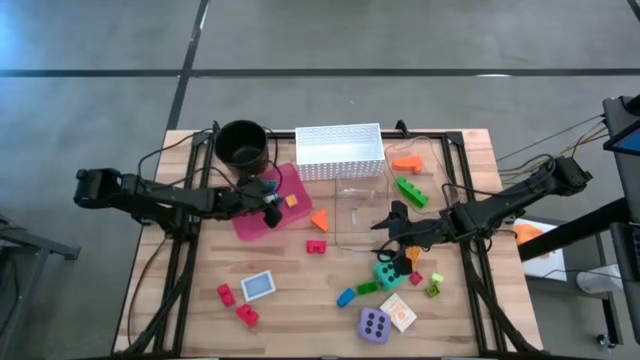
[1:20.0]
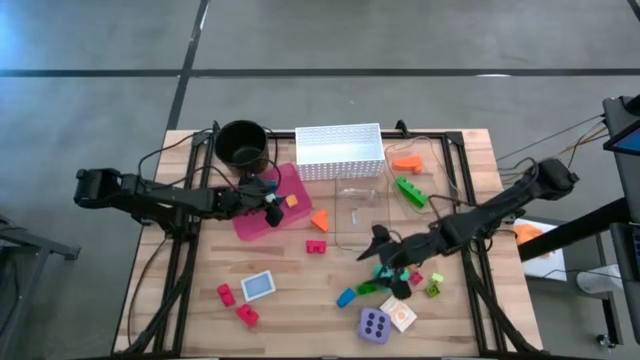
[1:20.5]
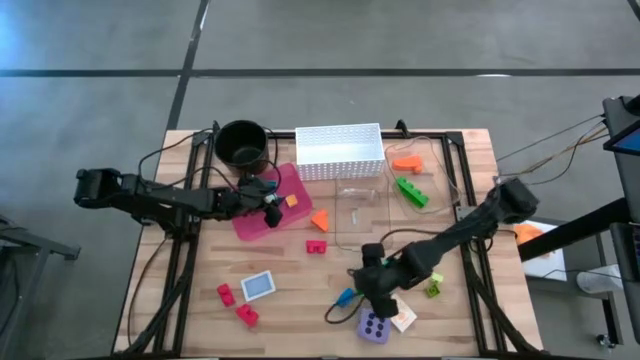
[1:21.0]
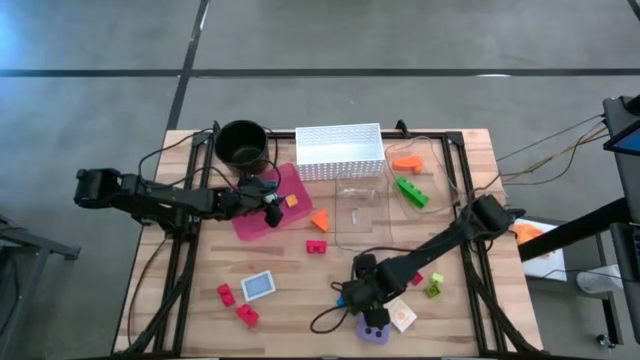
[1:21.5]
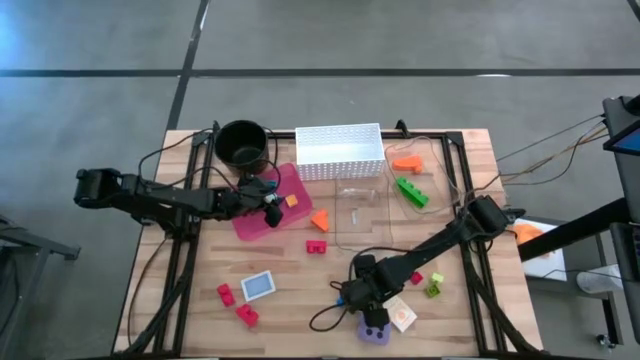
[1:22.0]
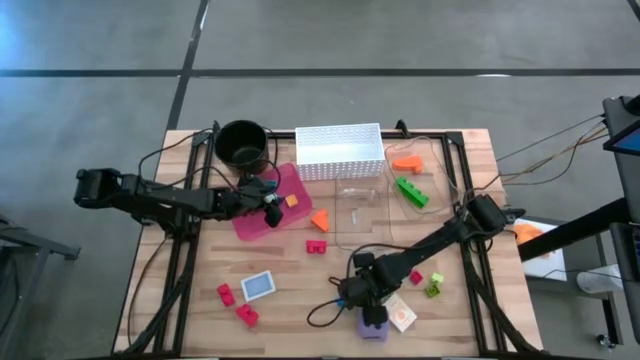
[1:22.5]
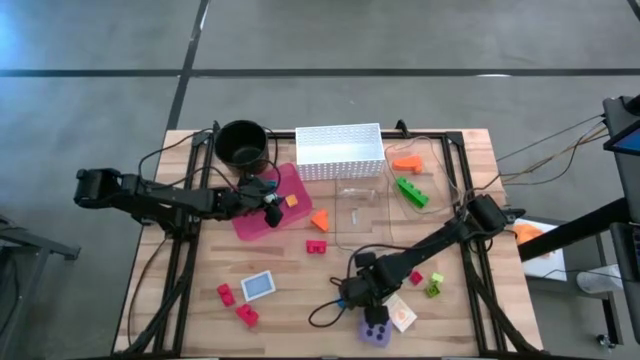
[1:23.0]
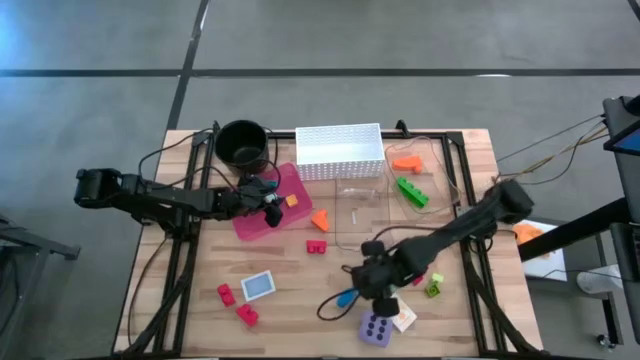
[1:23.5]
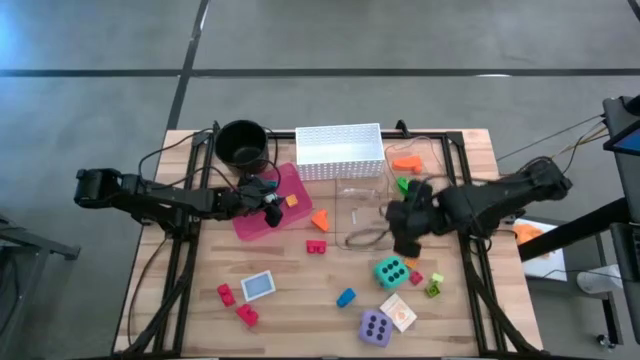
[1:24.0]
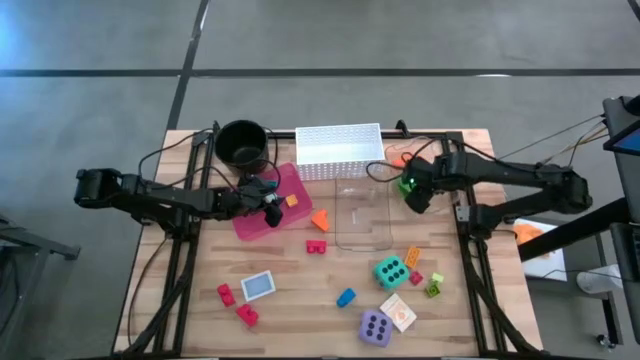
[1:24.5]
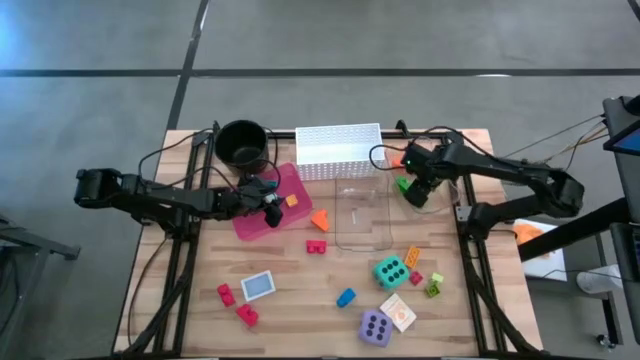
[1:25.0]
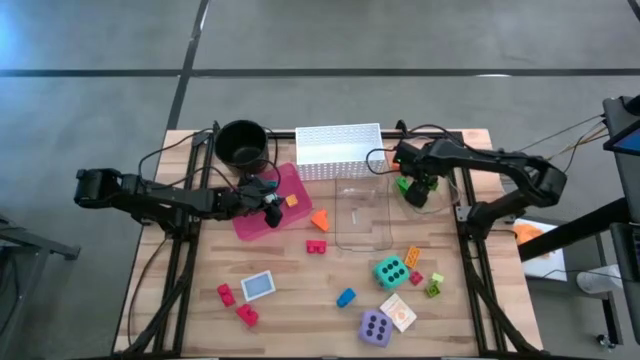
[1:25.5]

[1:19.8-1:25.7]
Task: Pick & Place Toys
Put the large green game piece into the top transparent bin

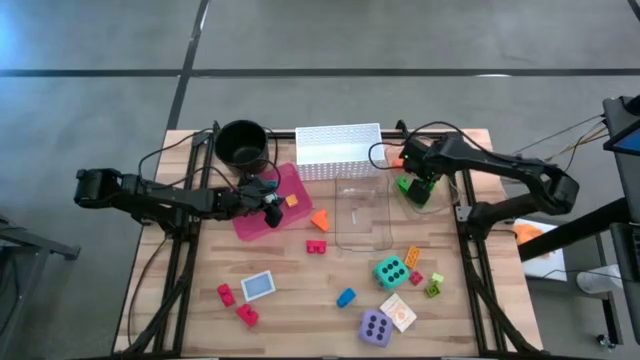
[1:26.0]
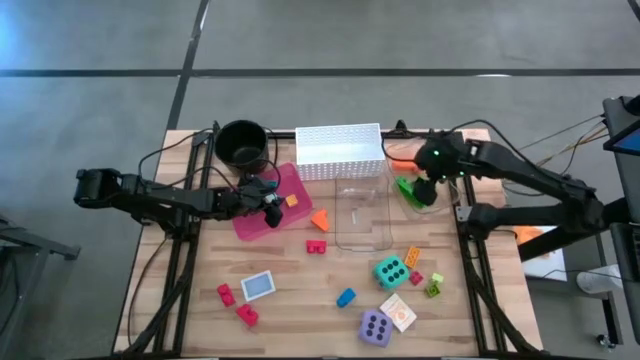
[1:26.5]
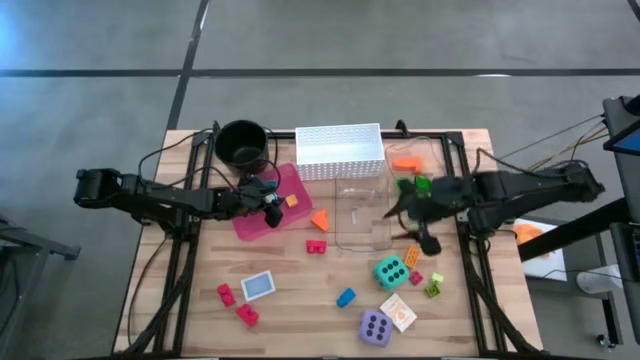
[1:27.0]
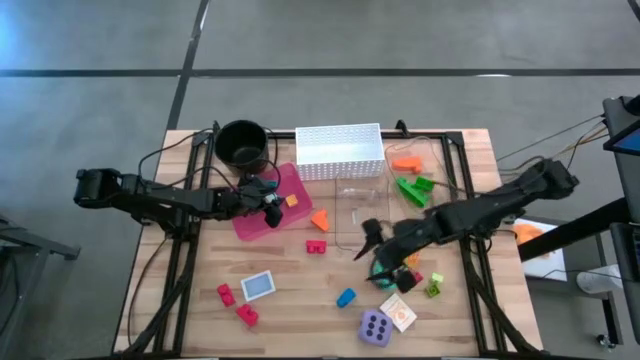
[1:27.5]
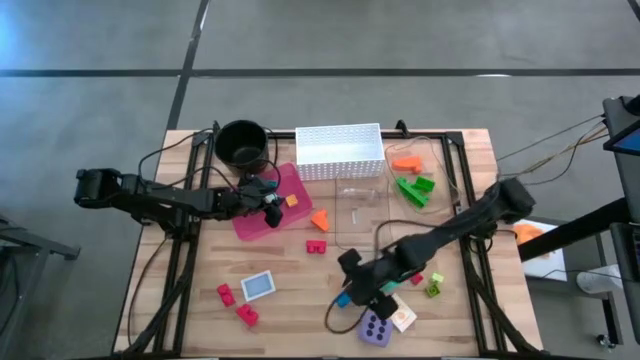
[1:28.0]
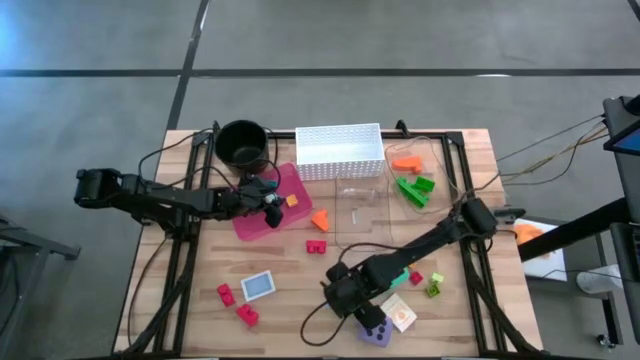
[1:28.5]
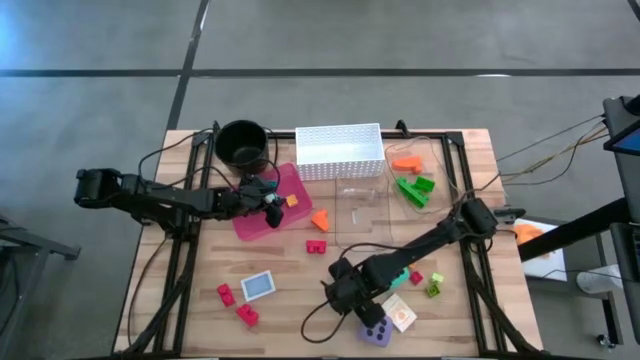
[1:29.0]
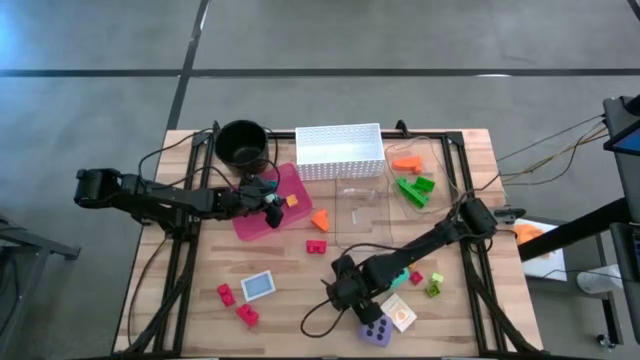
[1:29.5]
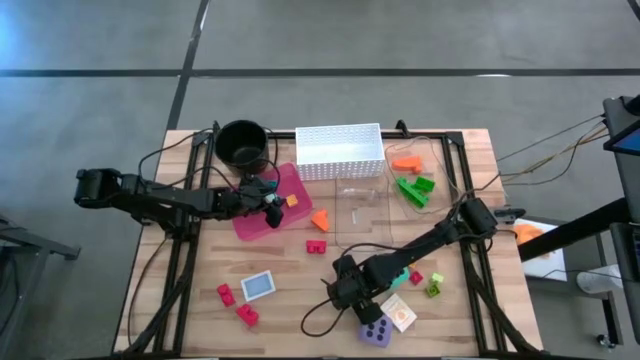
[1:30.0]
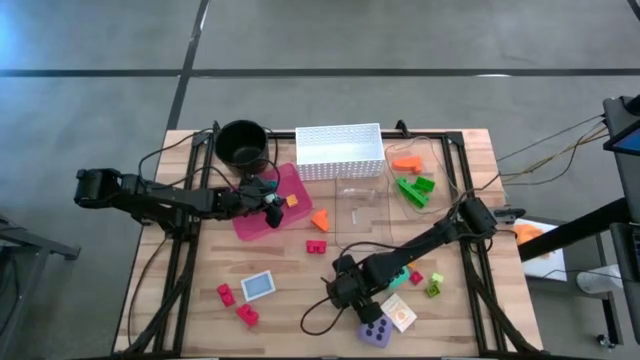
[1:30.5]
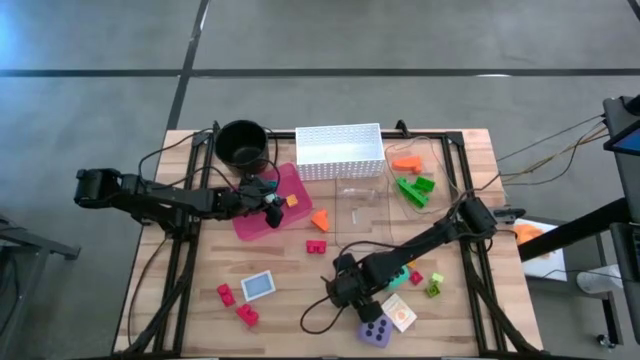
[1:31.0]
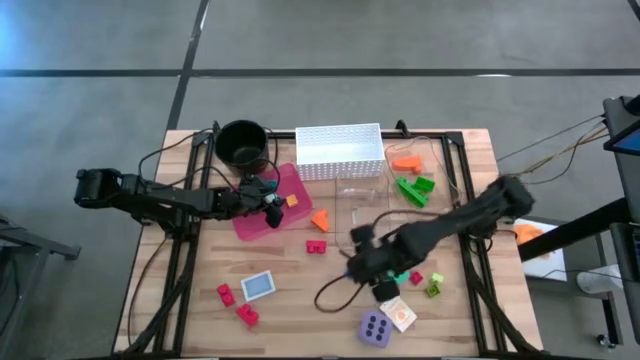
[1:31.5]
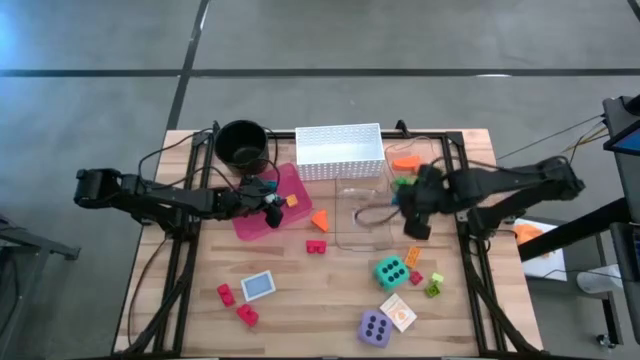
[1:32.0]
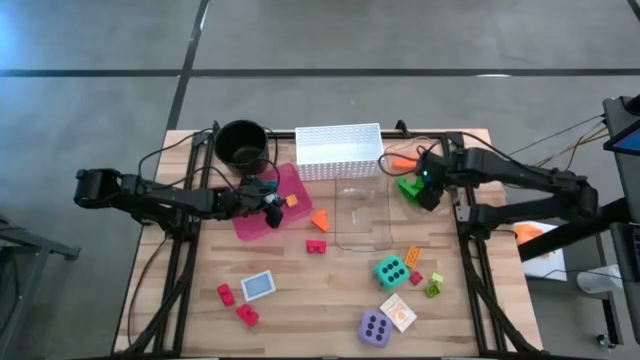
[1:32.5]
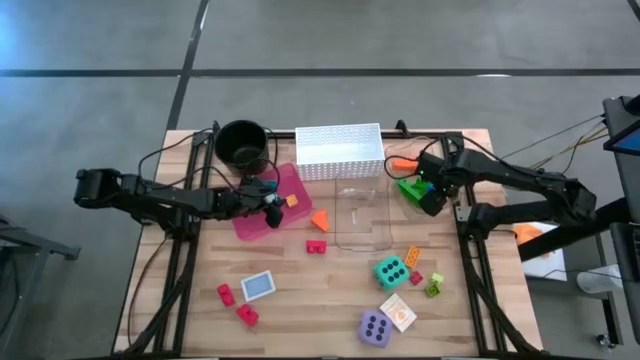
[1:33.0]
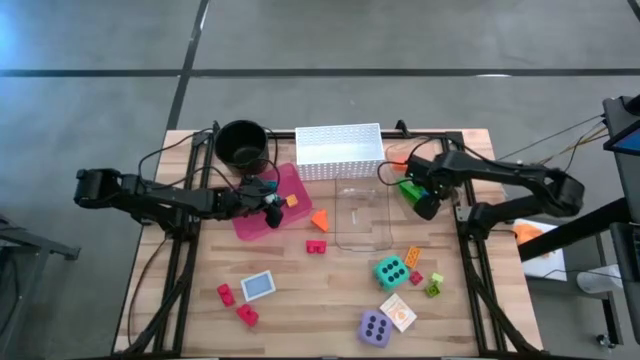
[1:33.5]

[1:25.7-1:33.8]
Put the large blue game piece into the top transparent bin

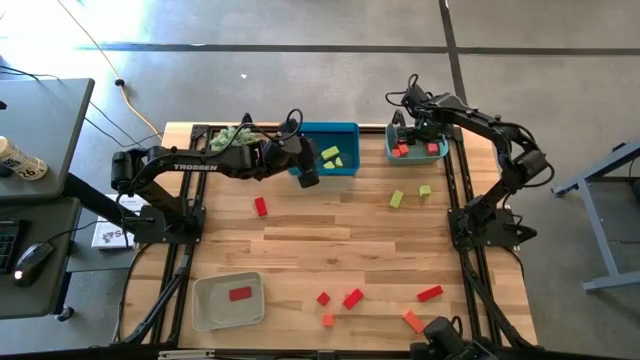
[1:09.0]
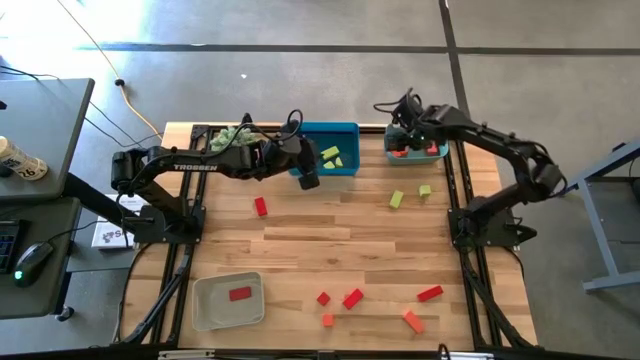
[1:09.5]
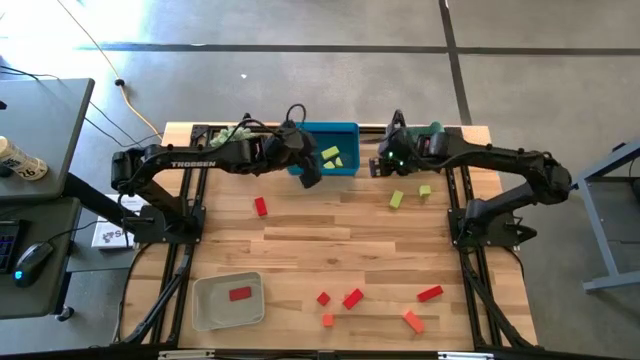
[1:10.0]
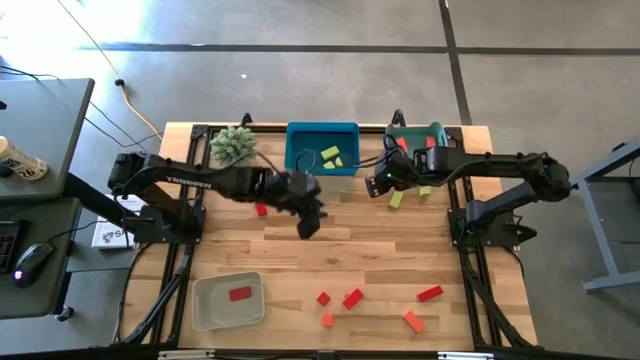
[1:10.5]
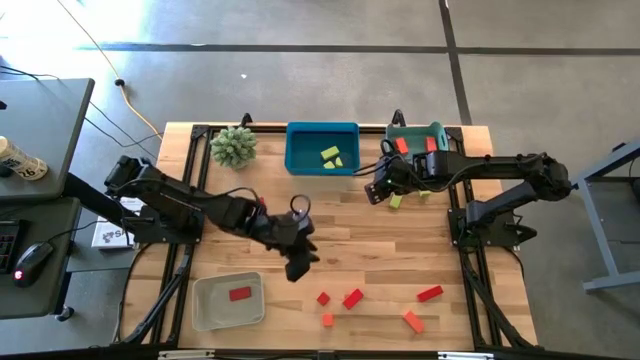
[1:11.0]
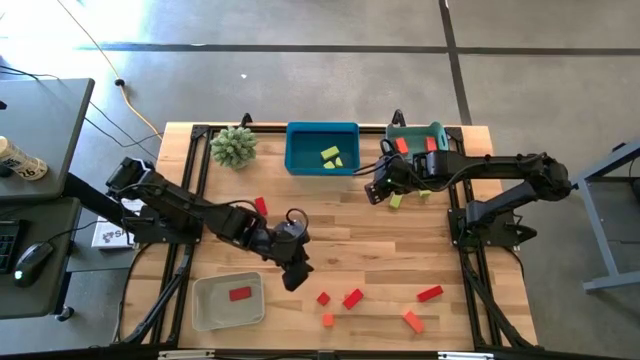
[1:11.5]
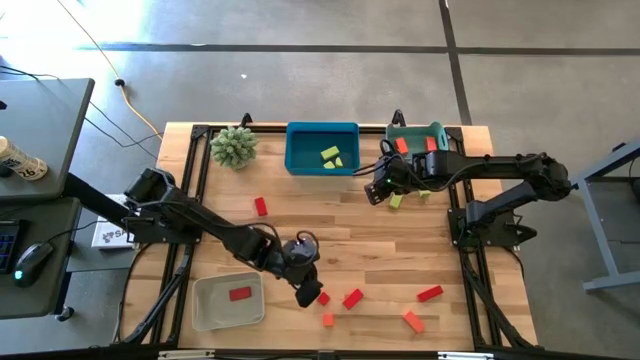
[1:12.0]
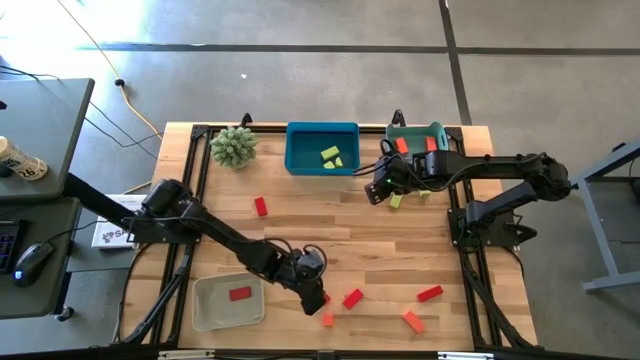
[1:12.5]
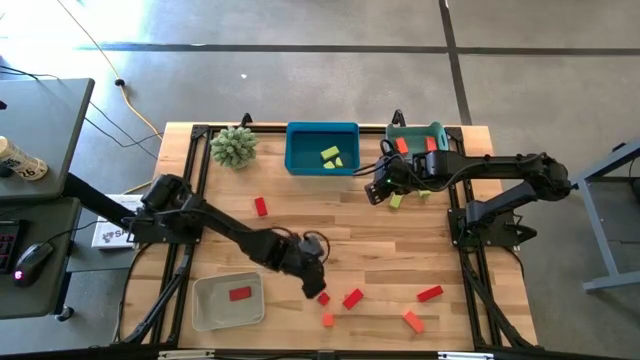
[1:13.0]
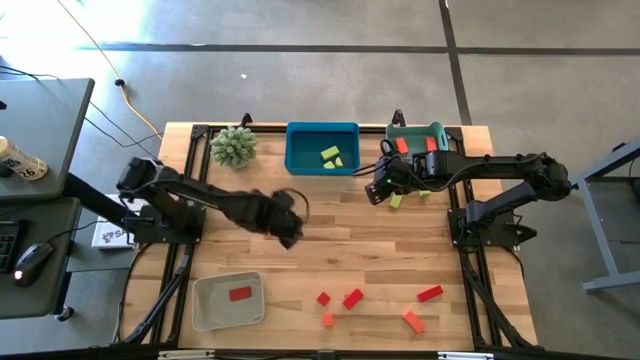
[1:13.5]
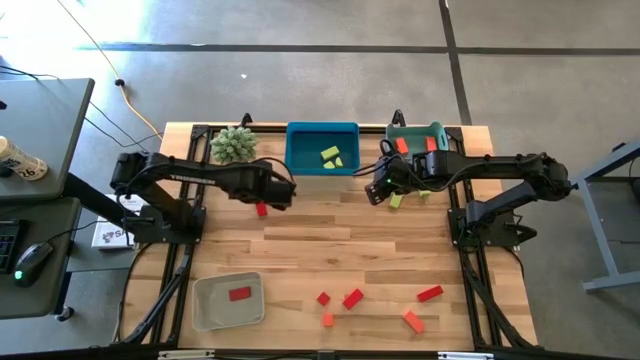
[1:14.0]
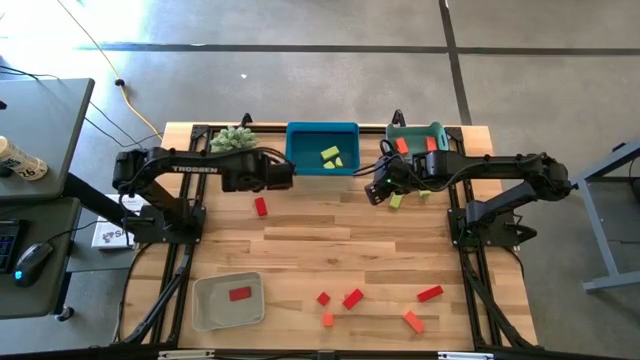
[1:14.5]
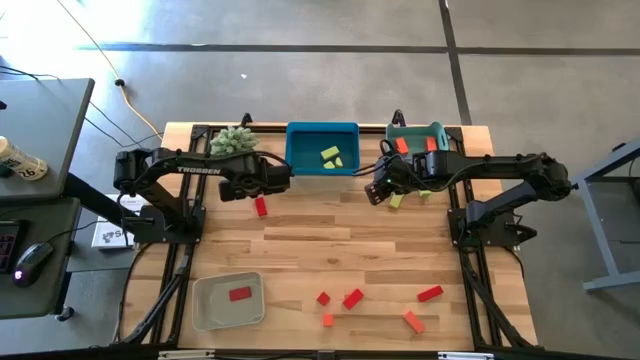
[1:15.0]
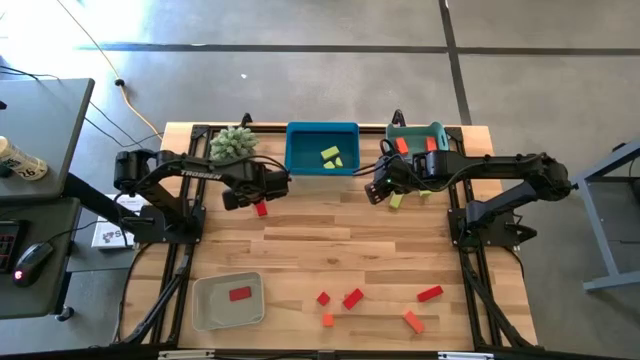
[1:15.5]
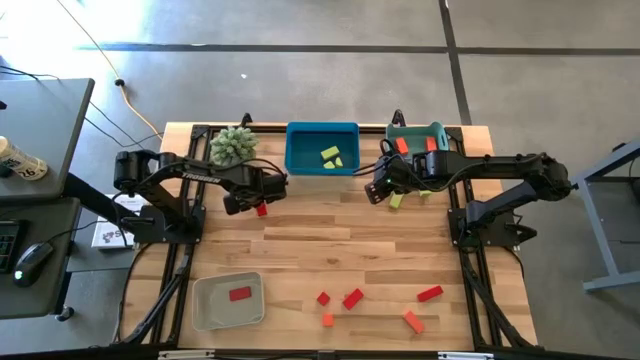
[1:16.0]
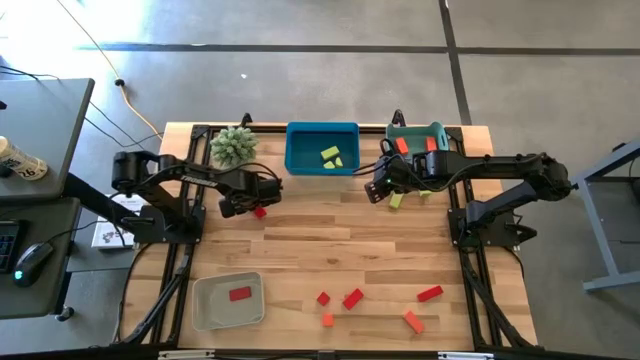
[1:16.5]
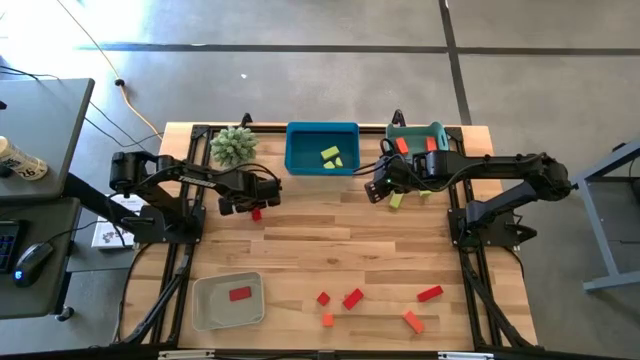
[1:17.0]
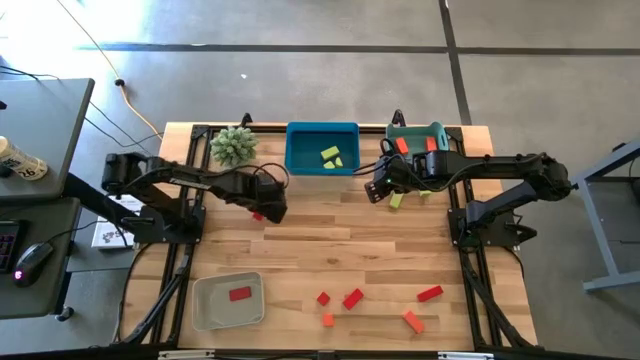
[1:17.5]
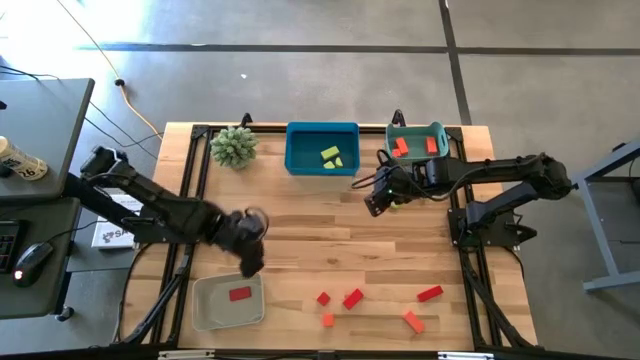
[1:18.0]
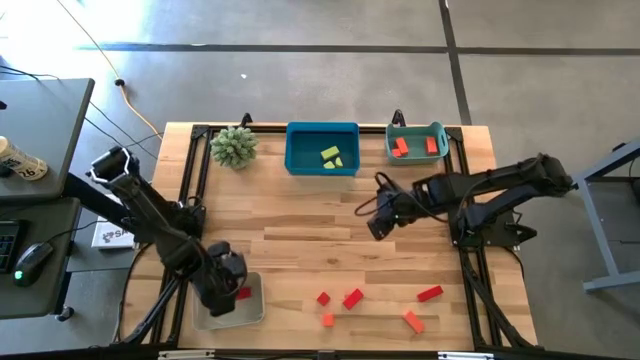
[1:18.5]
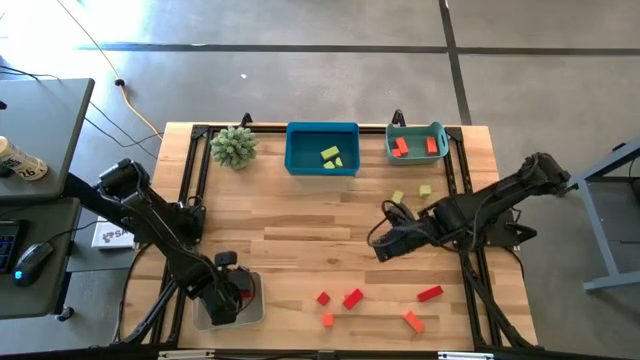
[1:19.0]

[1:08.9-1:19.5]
Task: Sort & place blocks by color
Put the red block into the gray bin
